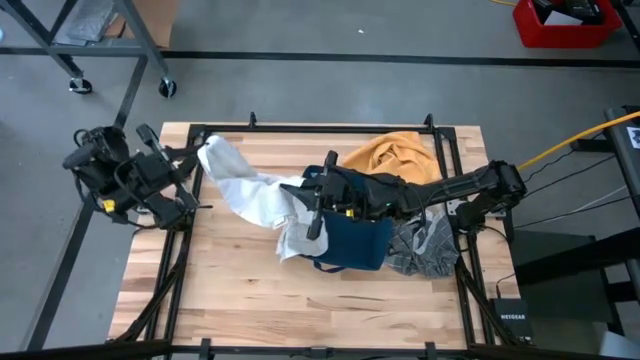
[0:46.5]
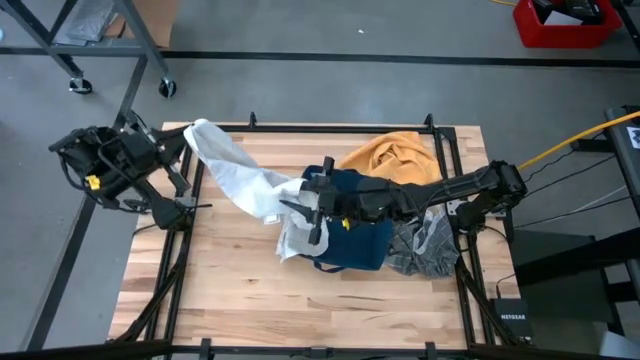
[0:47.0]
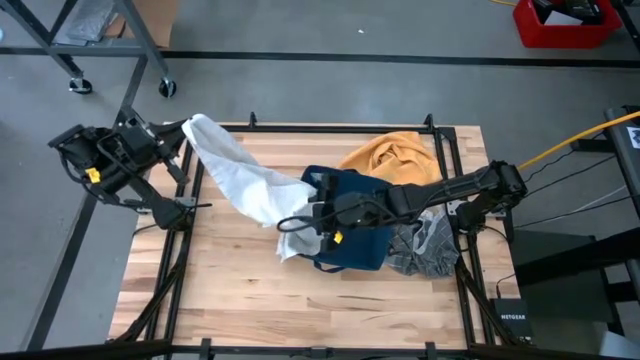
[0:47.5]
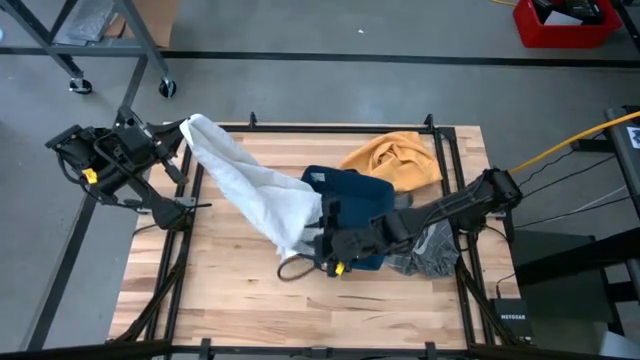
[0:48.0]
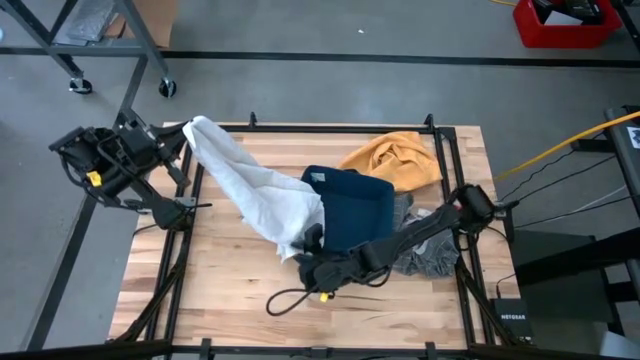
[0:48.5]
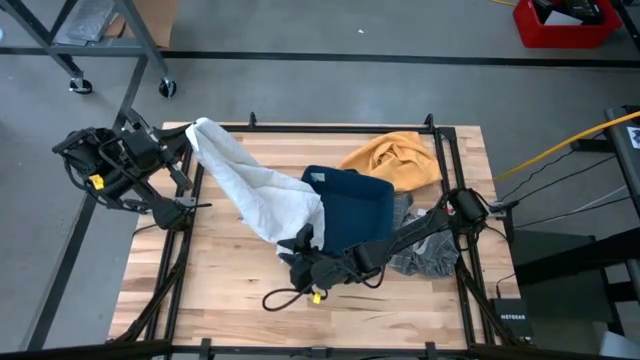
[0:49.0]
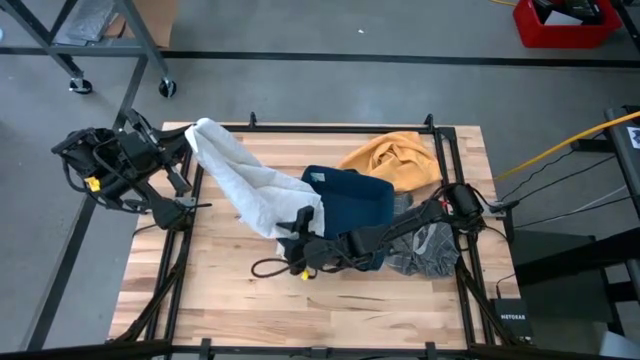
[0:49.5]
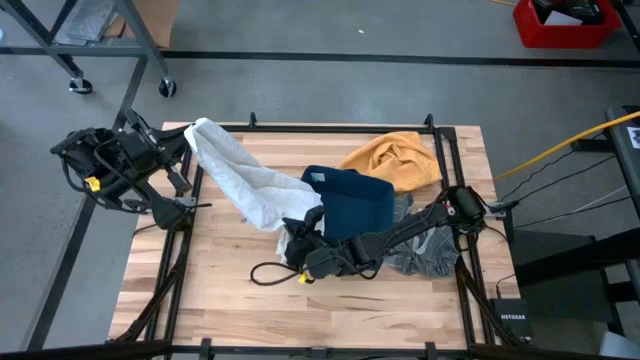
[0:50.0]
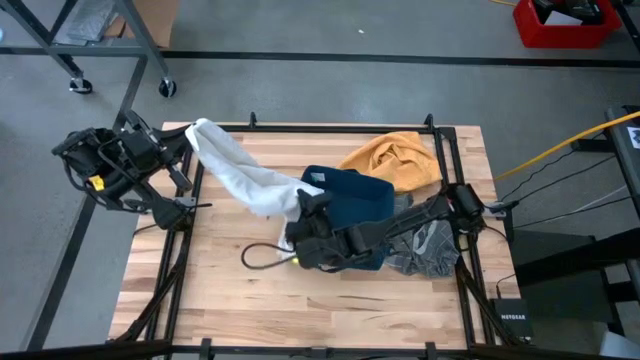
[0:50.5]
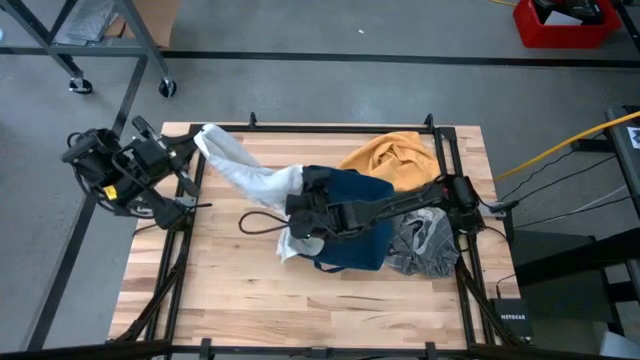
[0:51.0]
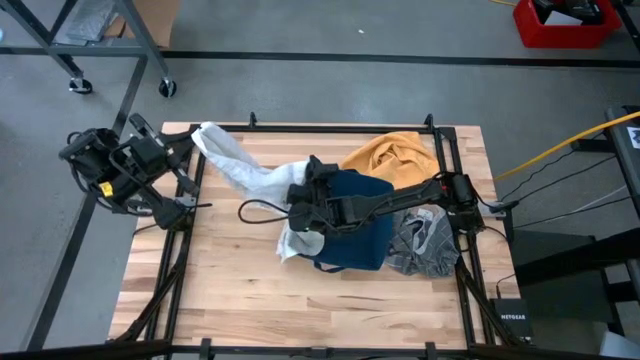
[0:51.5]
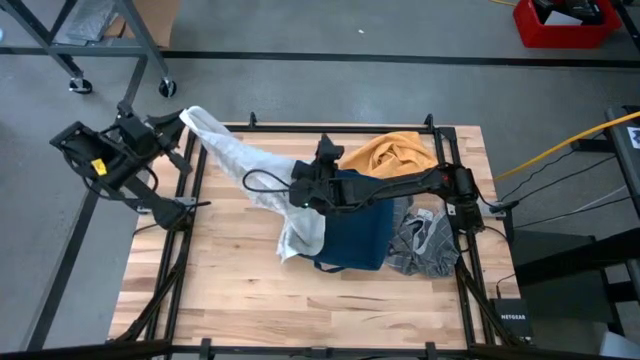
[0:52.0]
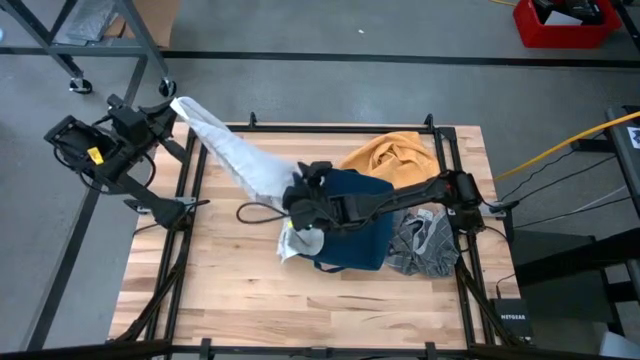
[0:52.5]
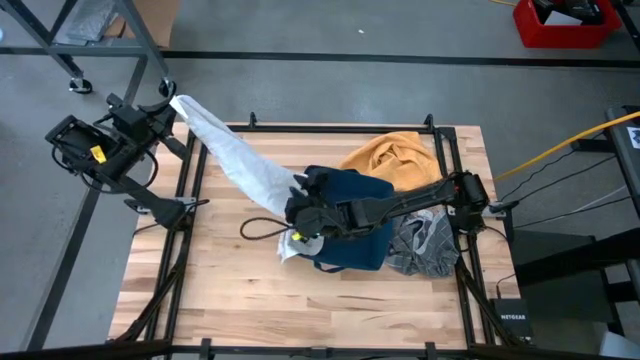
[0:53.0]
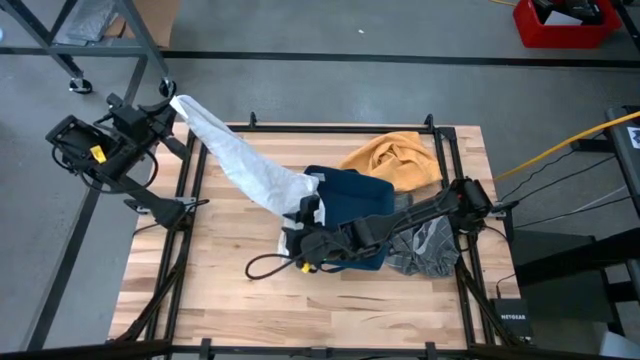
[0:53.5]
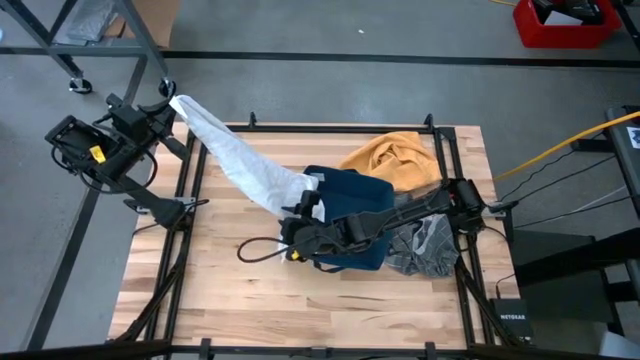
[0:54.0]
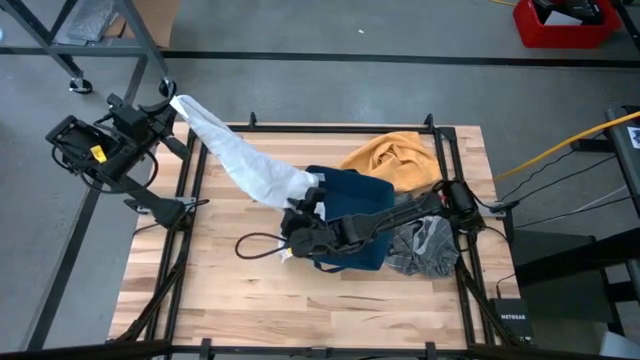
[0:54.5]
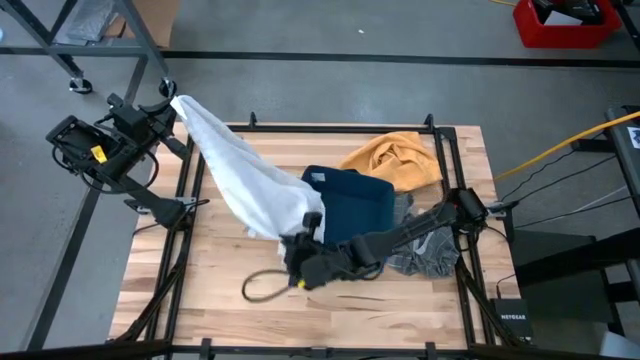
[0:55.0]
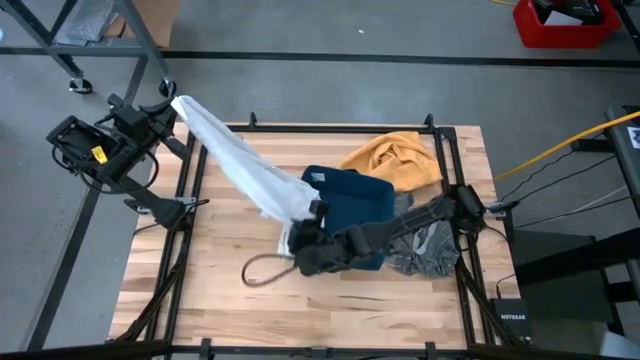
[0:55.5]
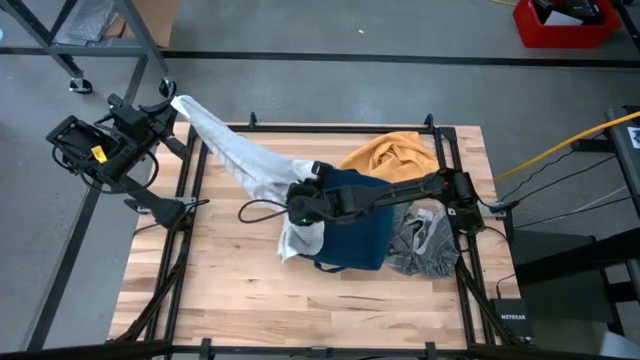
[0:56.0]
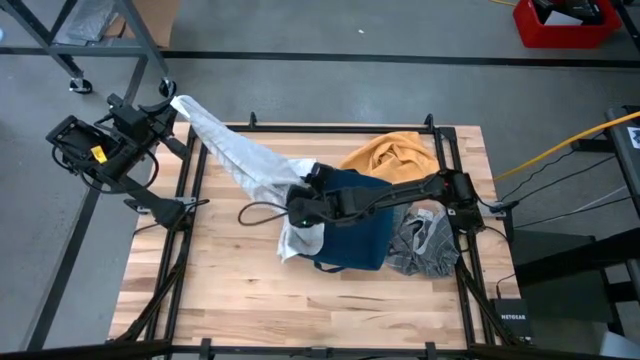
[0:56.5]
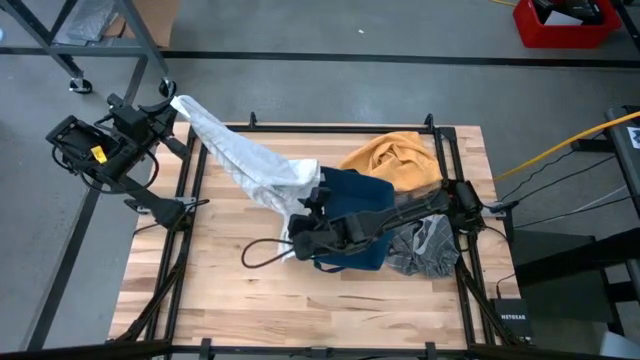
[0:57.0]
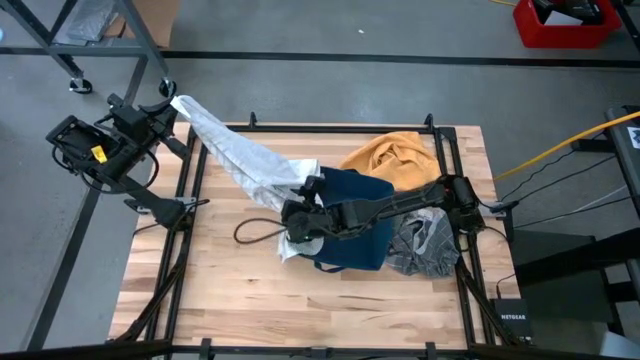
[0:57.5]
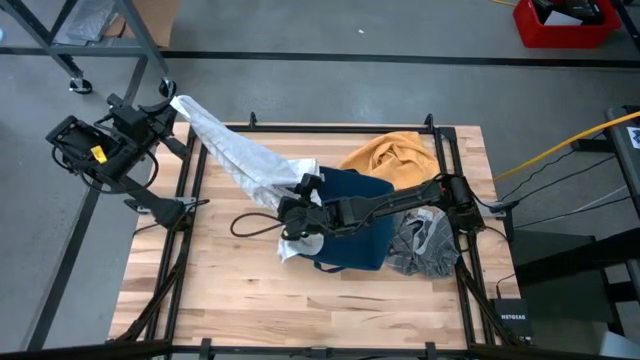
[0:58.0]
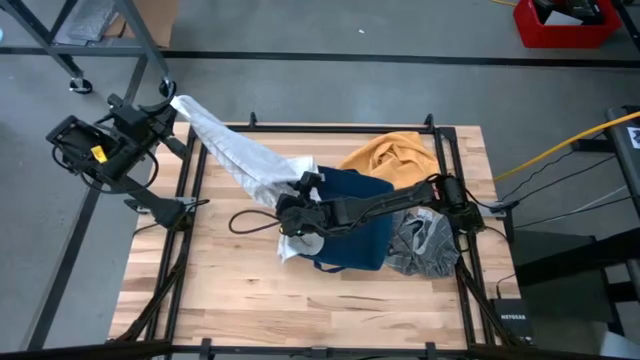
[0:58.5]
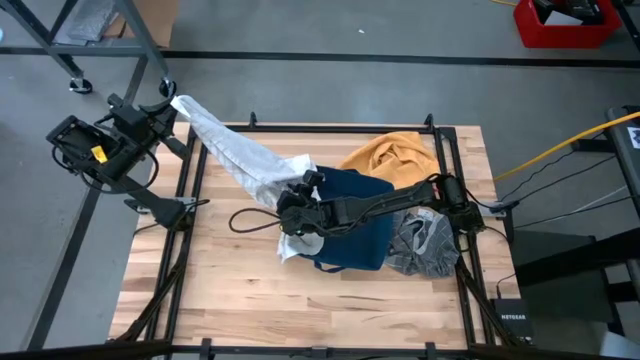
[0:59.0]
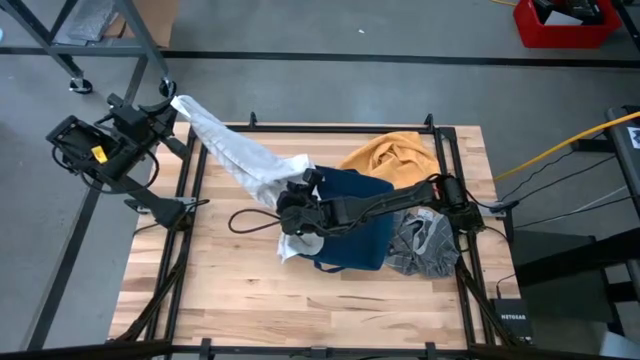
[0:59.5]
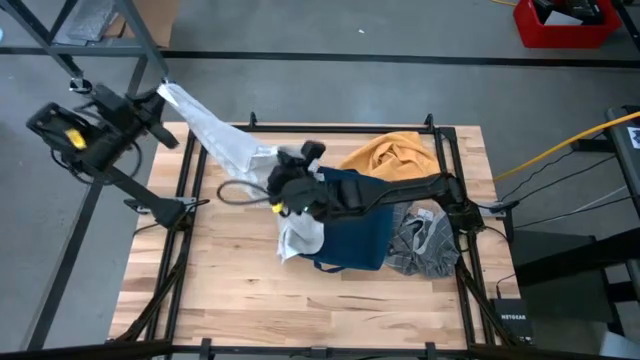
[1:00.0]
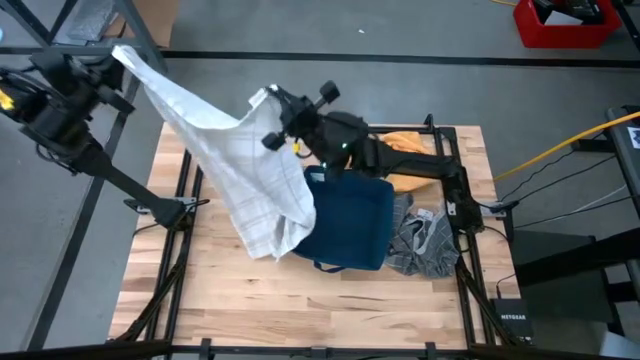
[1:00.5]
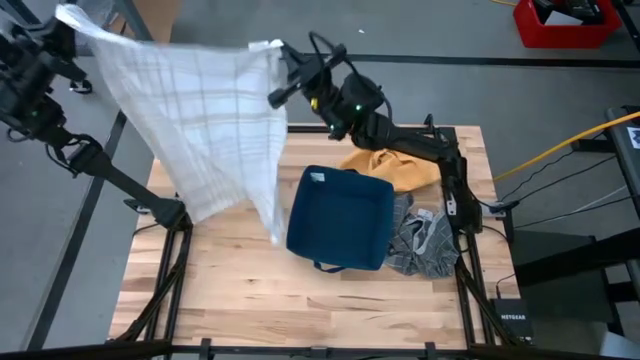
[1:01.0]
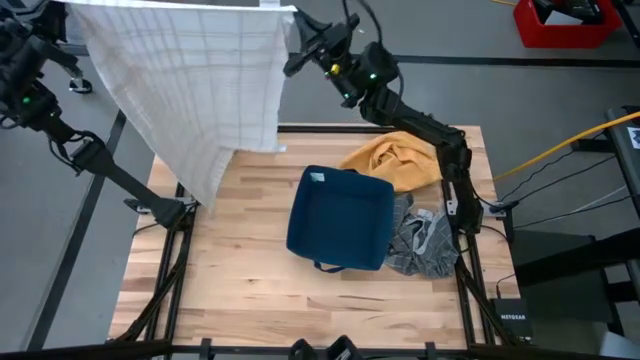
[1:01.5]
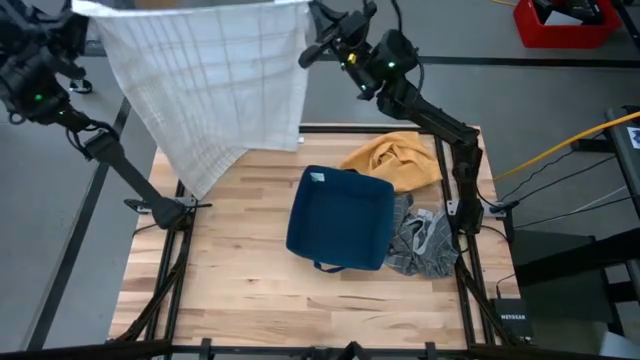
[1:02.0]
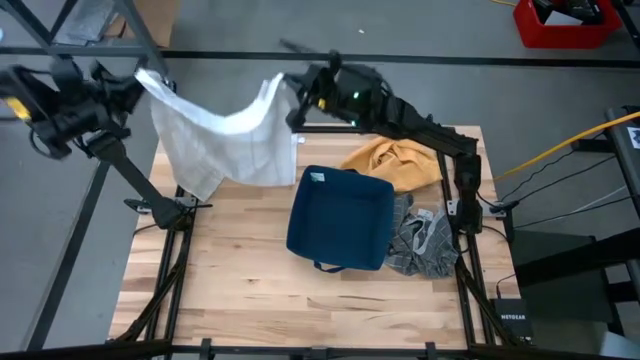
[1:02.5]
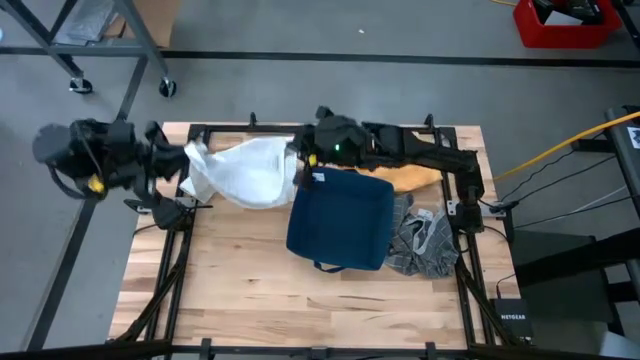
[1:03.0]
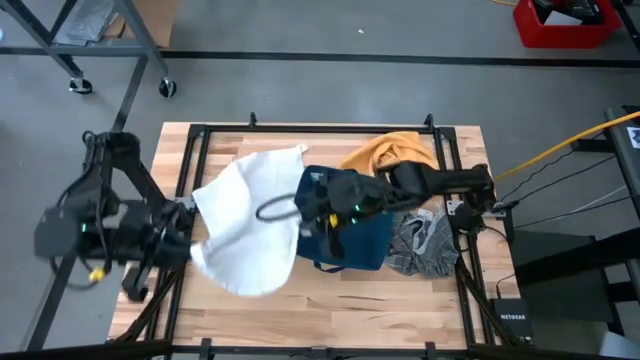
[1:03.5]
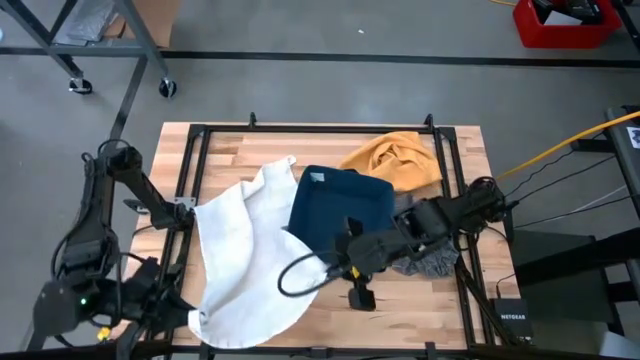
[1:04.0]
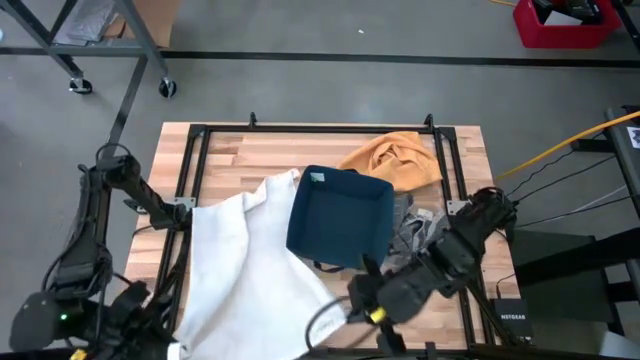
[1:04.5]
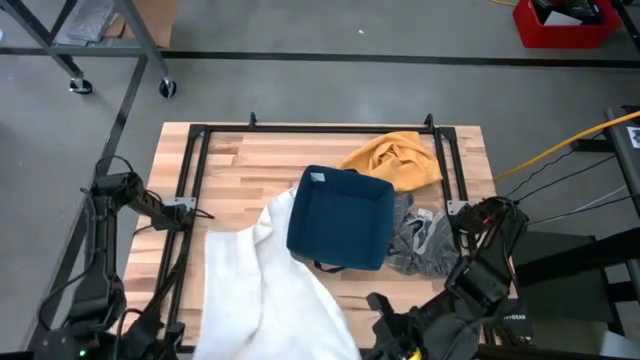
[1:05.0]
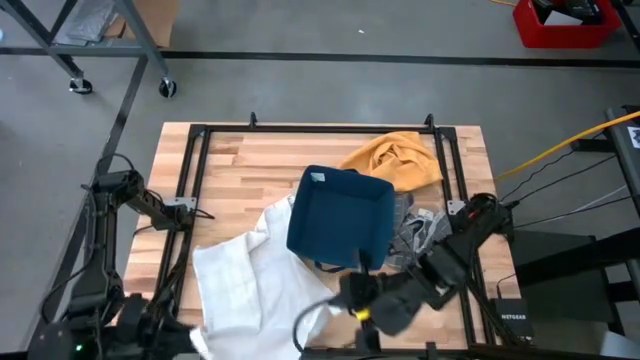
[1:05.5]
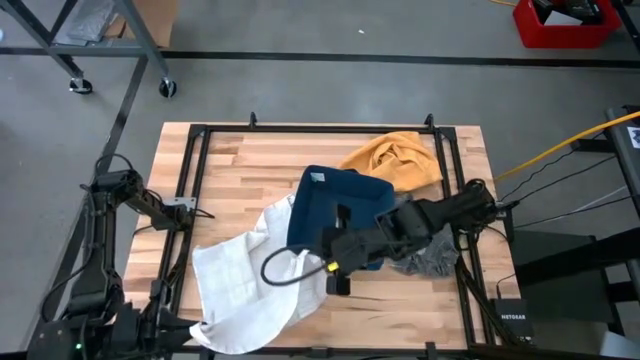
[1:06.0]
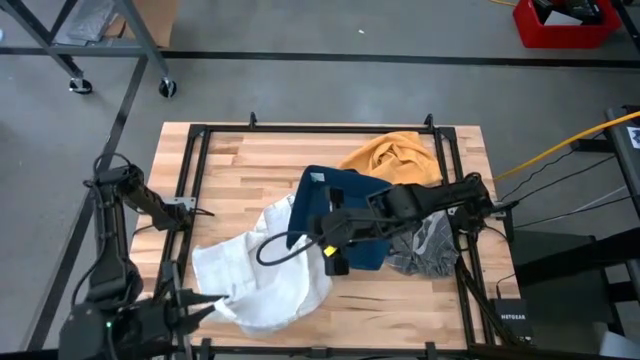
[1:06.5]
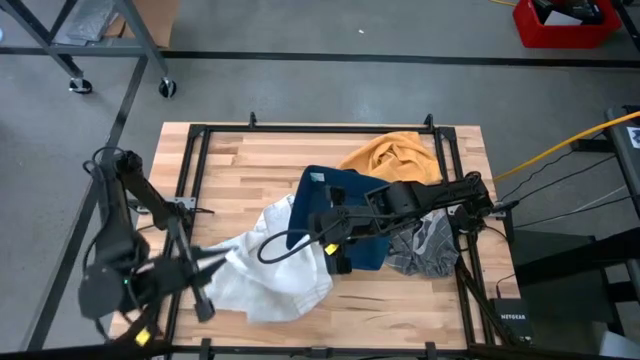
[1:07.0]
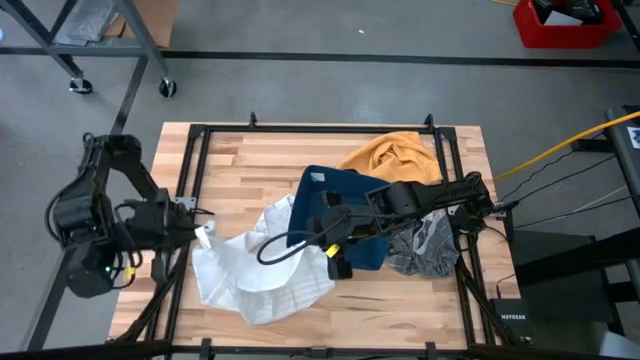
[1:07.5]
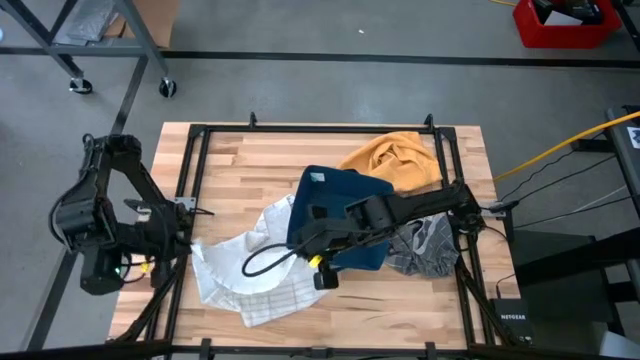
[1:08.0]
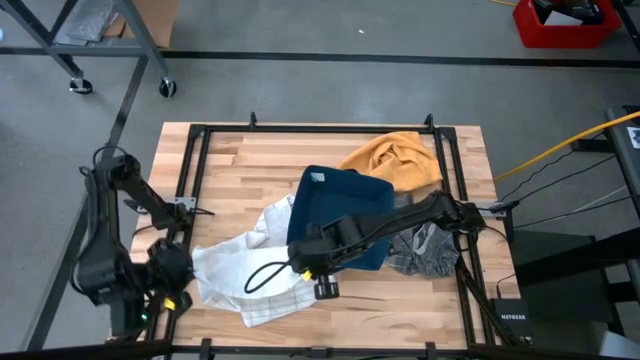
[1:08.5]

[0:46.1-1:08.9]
Task: Fold towel
Fold the white patterned towel
